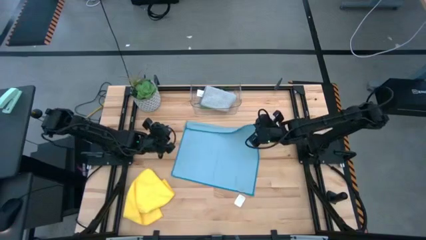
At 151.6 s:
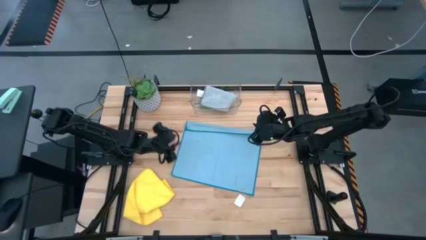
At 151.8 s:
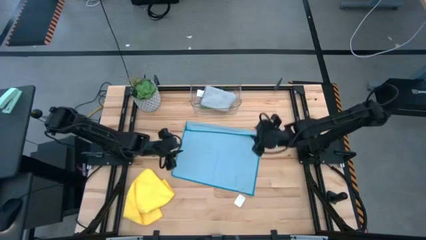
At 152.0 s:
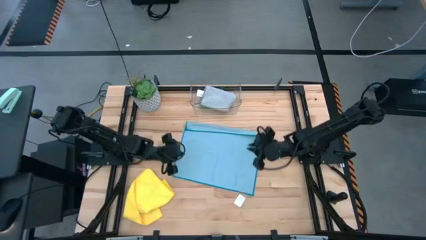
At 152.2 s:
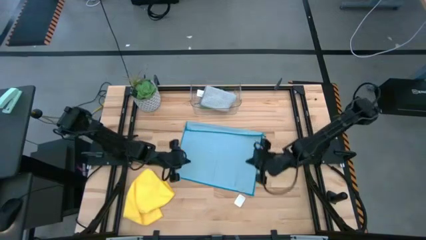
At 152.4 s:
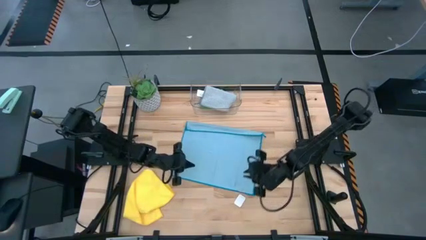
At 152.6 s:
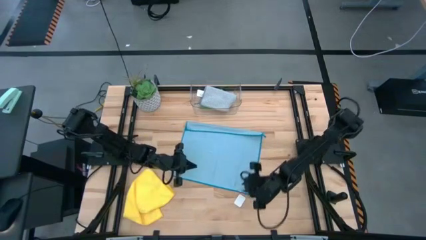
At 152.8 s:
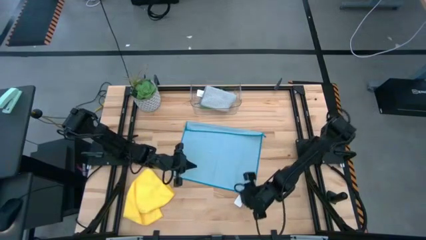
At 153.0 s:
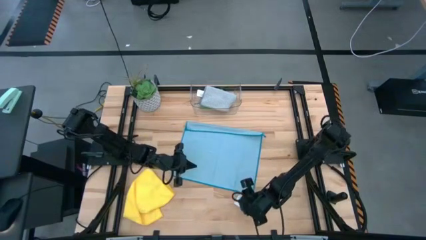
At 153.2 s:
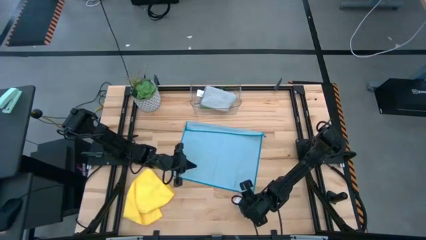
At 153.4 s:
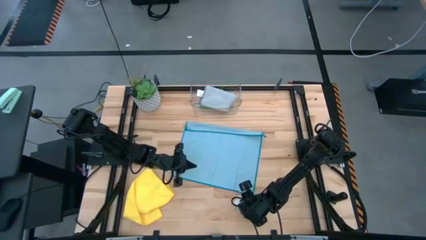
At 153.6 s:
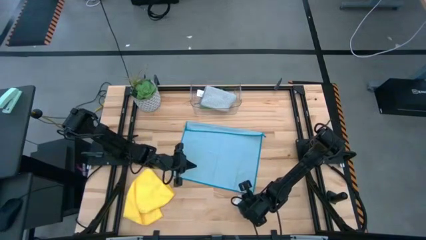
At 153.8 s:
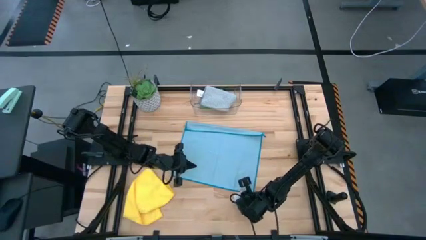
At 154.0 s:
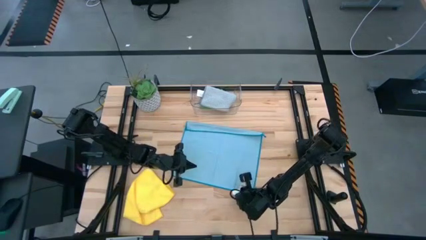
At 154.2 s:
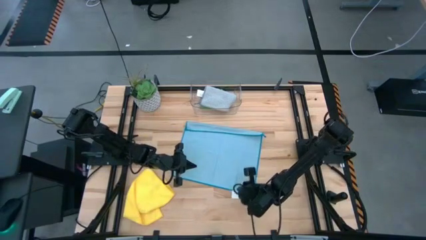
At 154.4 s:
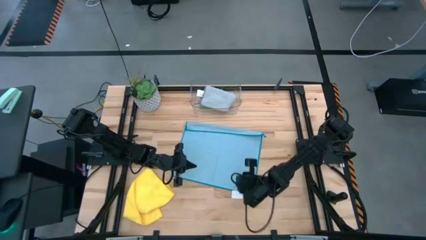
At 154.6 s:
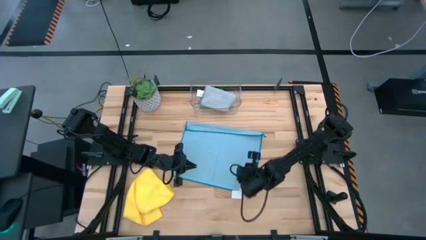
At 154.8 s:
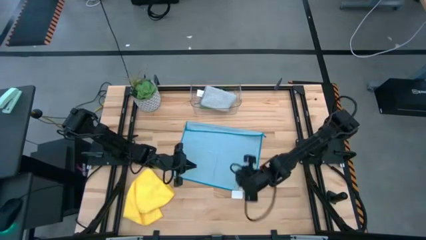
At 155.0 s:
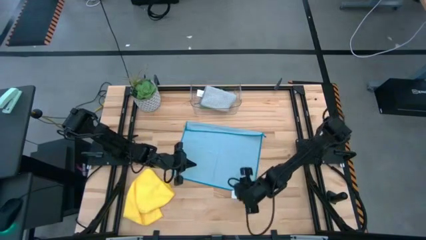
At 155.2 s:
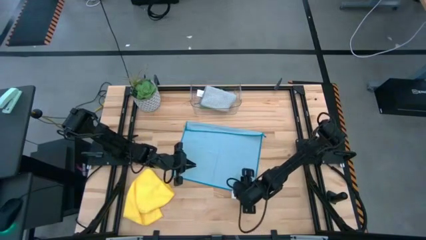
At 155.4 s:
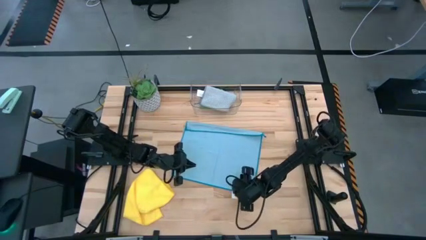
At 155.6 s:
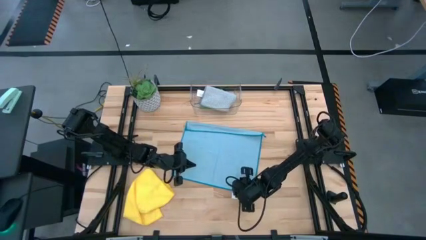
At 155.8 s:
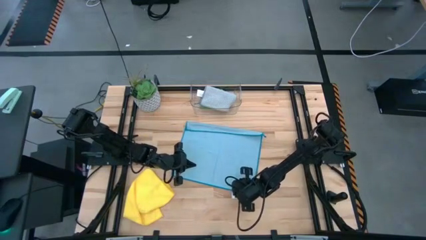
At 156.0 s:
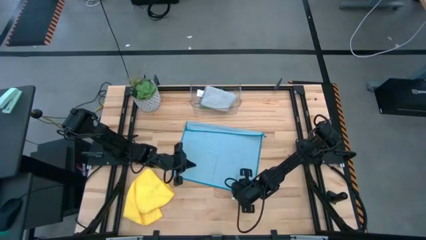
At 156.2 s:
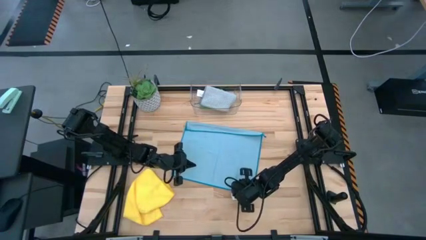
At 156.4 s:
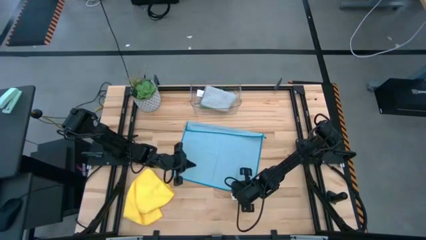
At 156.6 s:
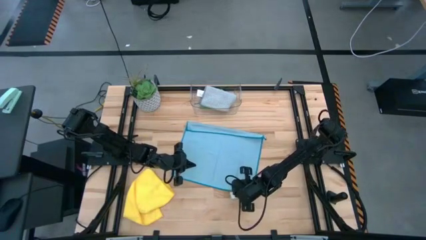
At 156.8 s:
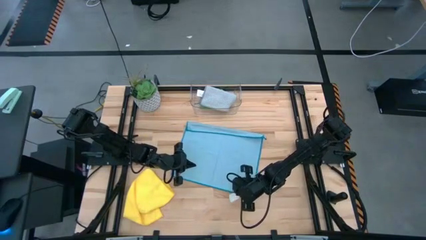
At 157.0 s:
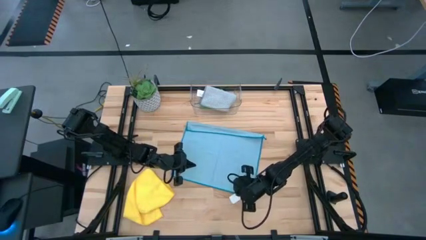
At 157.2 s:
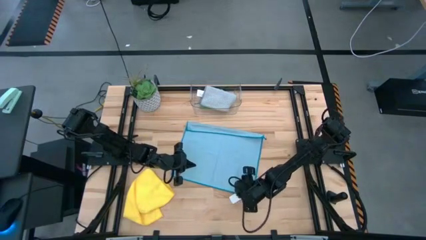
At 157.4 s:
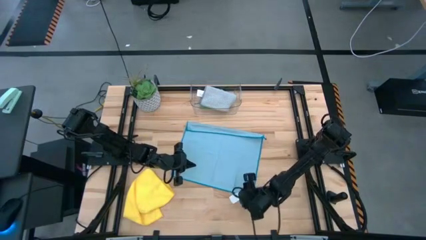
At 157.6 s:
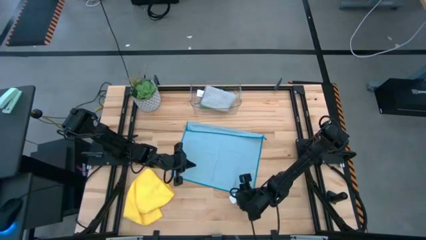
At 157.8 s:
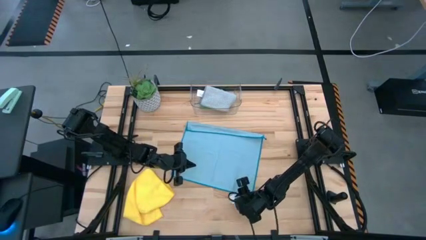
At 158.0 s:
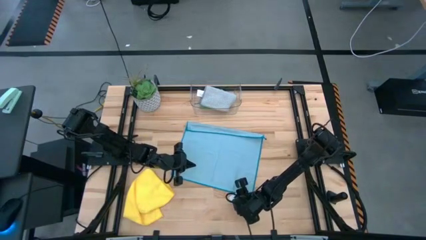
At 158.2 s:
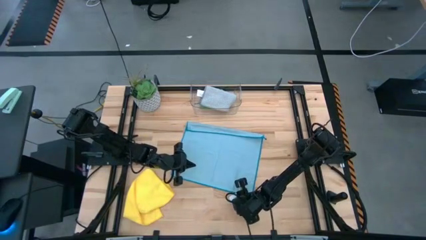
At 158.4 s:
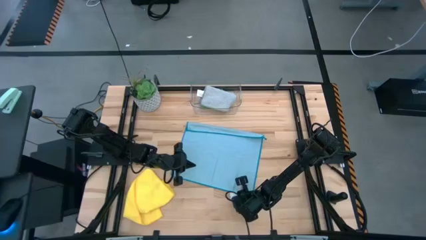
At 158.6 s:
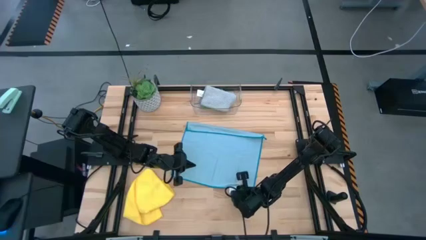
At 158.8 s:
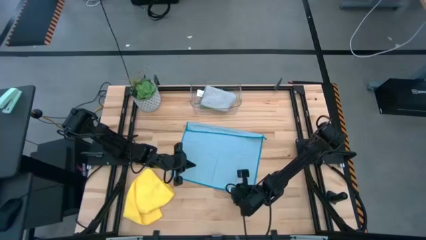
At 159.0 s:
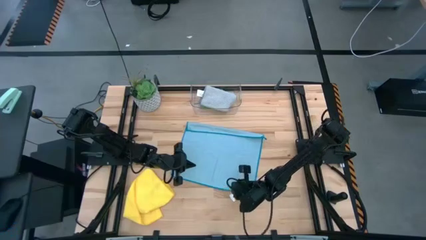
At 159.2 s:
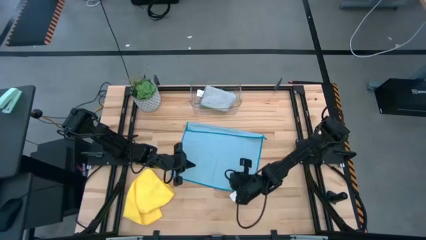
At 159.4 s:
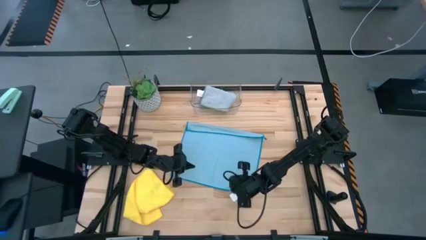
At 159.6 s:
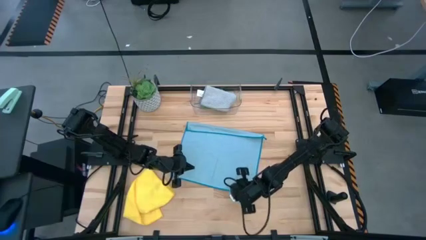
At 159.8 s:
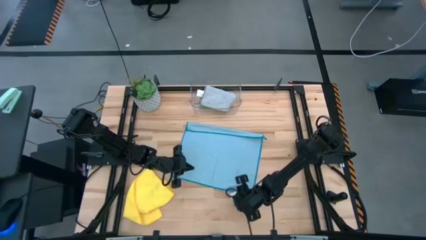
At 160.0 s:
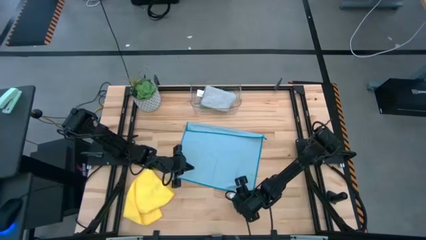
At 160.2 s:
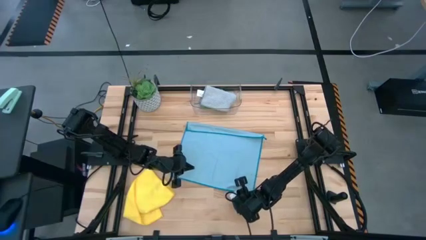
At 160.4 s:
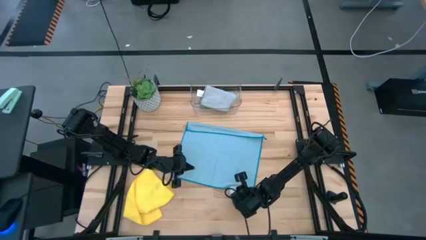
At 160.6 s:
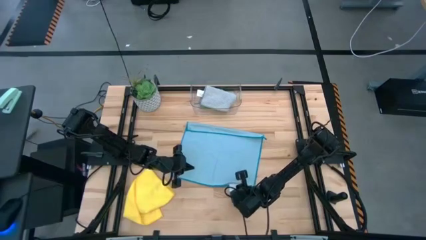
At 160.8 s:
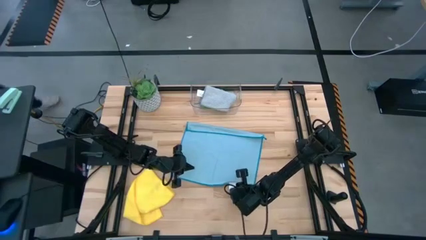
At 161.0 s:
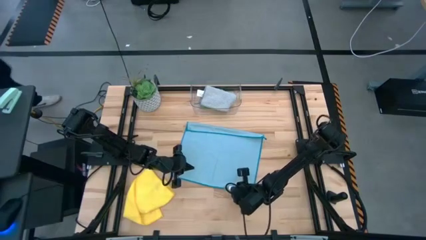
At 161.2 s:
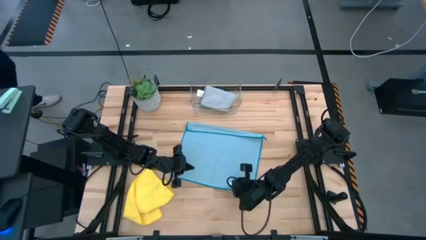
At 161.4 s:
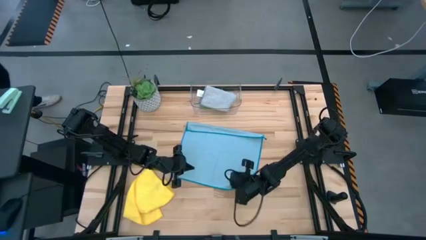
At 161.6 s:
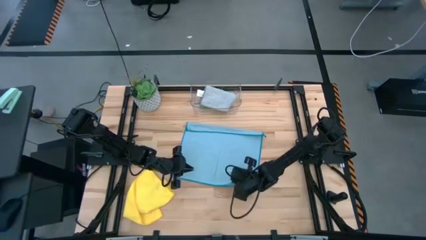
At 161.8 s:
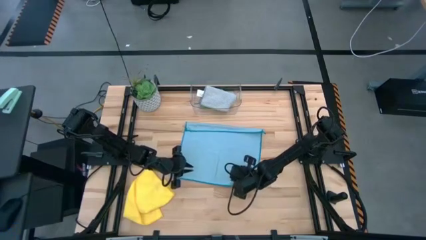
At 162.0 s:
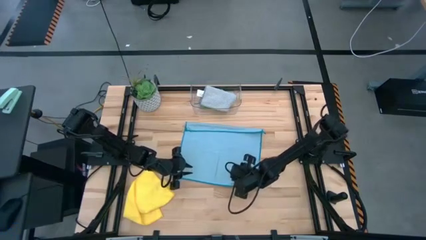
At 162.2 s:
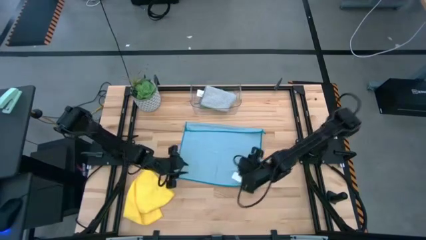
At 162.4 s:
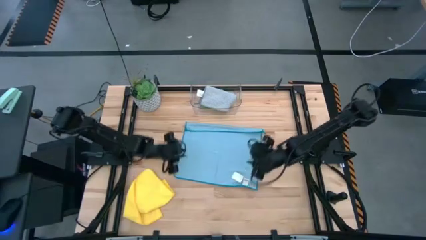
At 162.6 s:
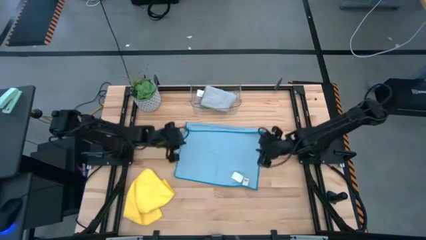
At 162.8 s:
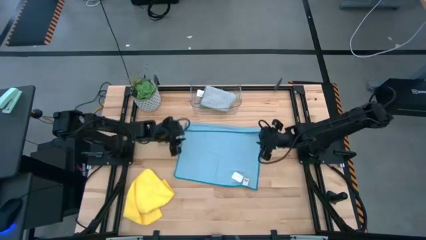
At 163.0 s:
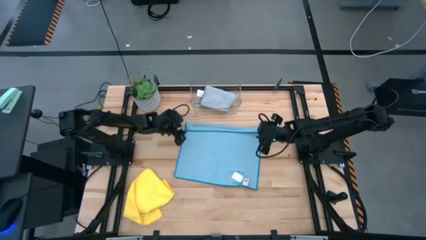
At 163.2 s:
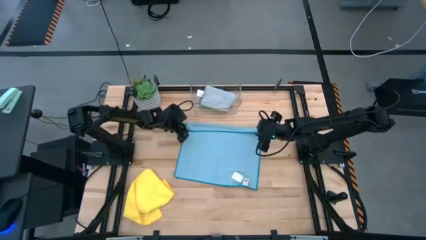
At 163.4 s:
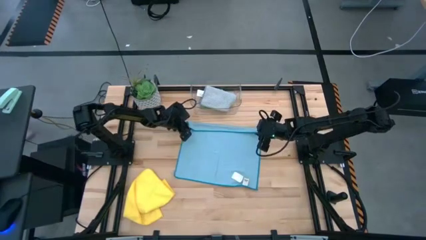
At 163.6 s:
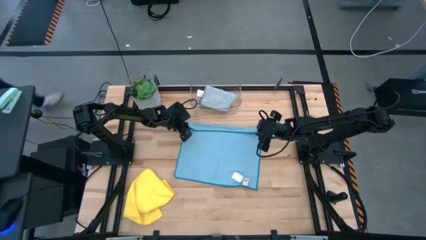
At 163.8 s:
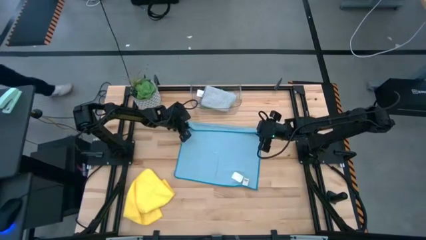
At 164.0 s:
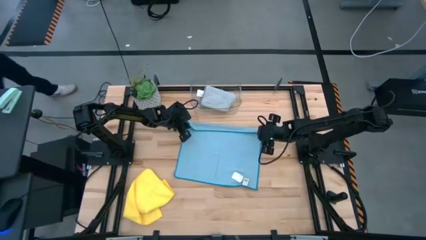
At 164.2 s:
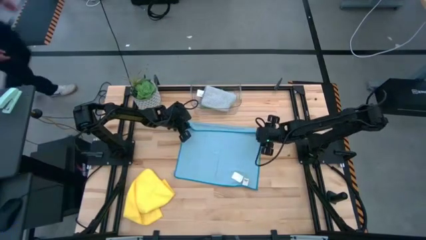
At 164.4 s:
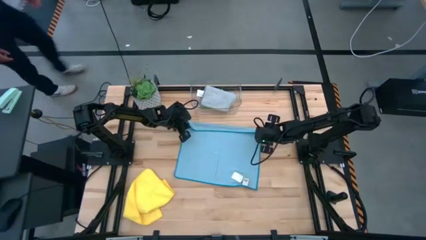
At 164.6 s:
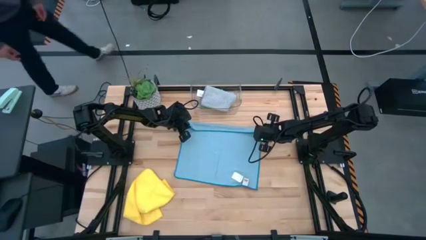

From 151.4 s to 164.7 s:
Task: Fold microfiber towels
Fold the blue microfiber cloth

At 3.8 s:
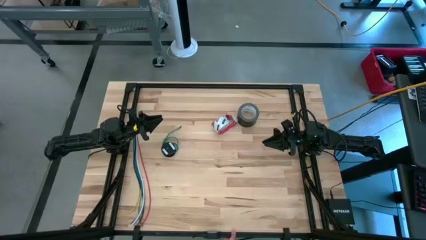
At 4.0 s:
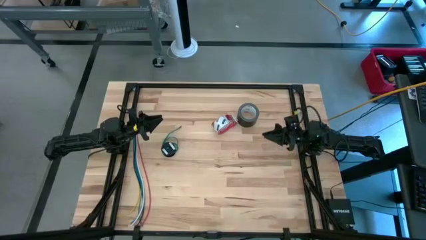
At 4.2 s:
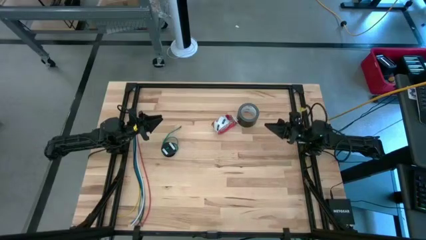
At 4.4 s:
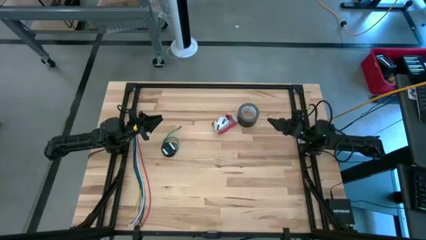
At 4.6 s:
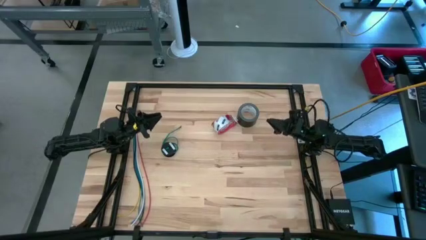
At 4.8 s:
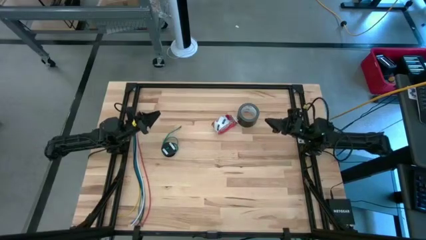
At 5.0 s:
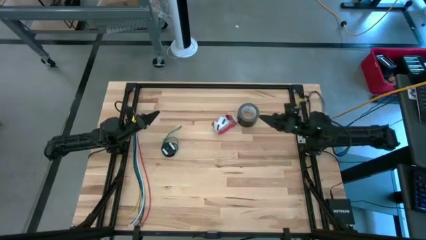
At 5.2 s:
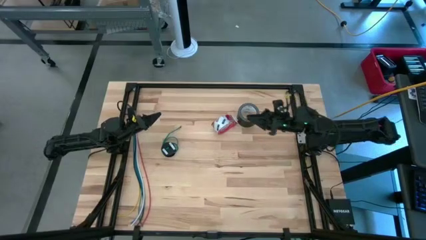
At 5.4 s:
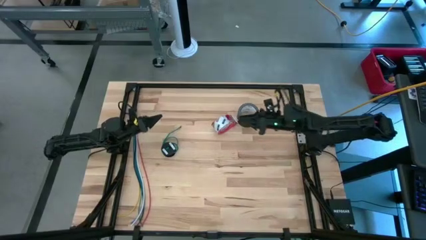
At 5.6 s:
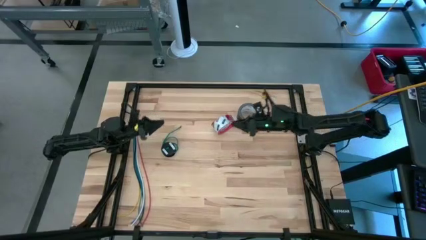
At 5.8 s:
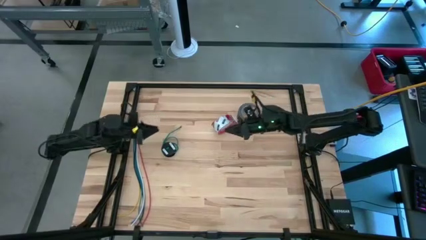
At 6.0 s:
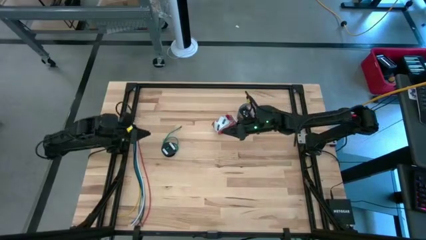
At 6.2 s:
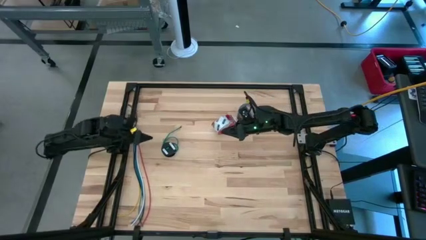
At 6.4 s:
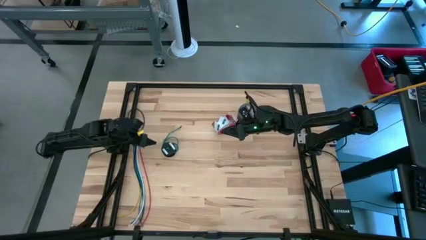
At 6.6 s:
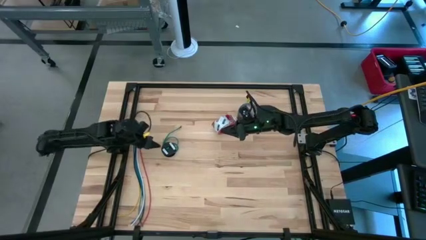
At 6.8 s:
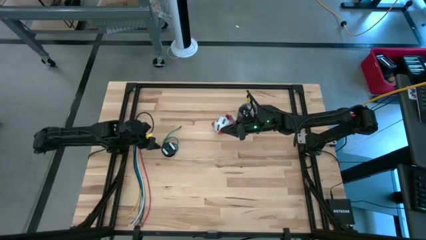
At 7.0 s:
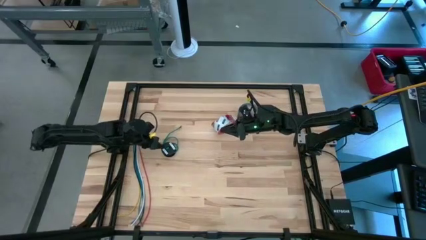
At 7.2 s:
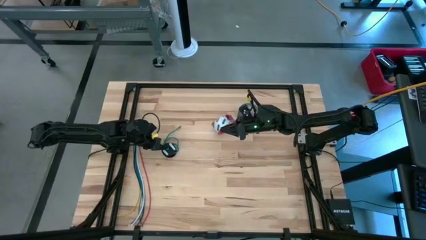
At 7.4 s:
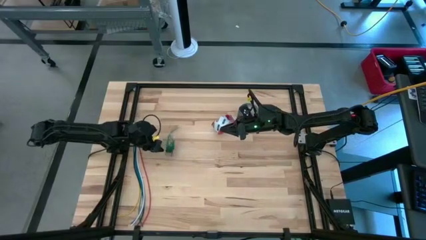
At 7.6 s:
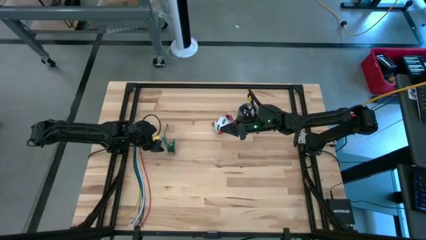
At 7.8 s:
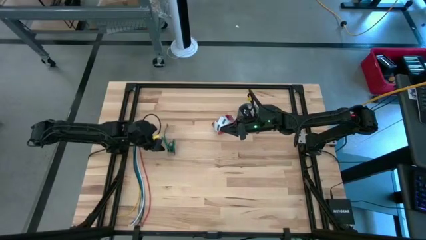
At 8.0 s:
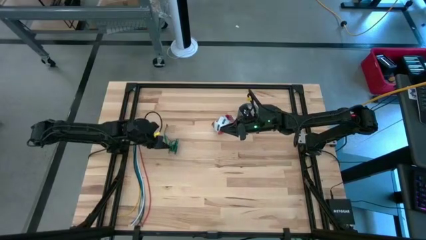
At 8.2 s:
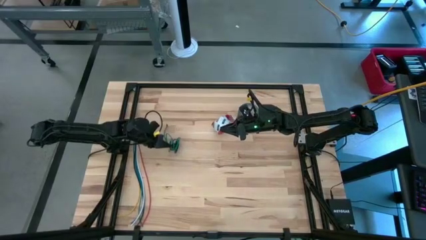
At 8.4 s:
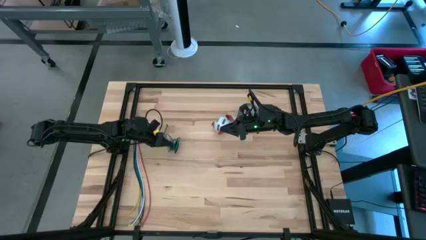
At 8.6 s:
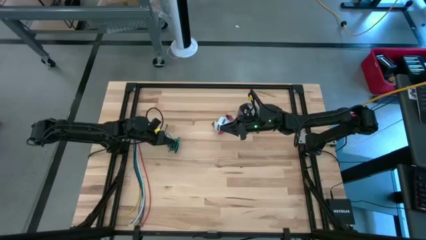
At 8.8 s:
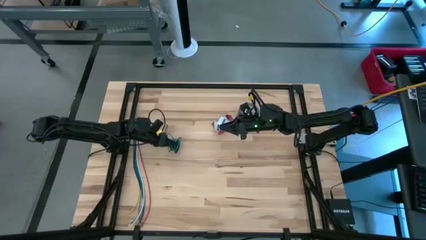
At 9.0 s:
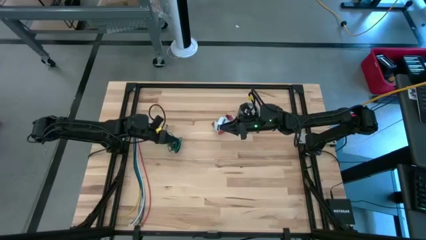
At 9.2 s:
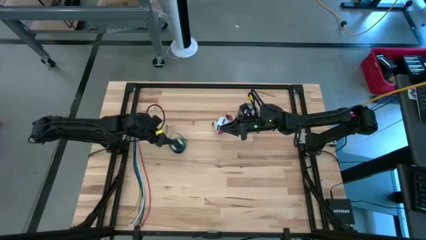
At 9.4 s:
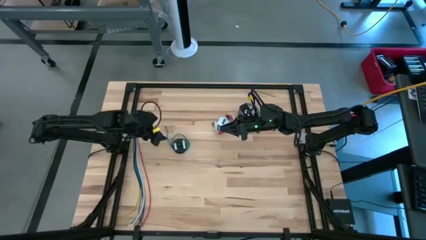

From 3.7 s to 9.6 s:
Task: Coil cords
Uncoil the green wire from the spool
